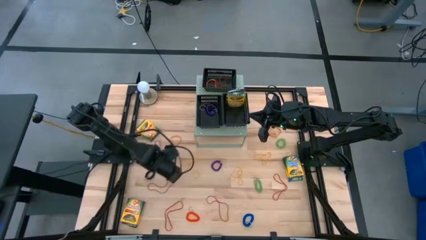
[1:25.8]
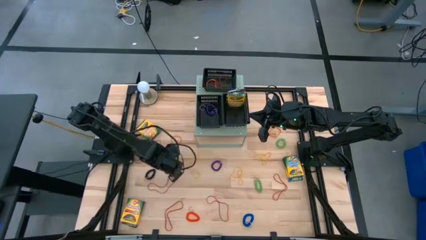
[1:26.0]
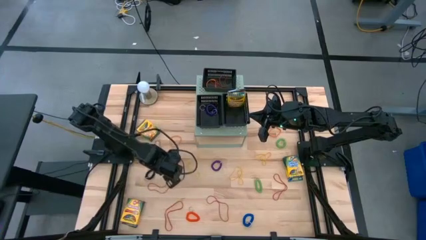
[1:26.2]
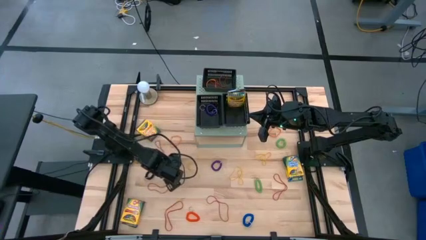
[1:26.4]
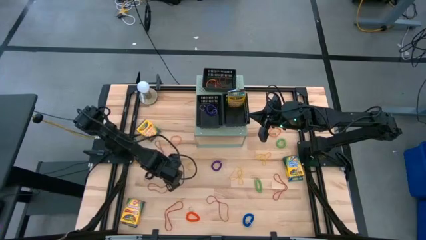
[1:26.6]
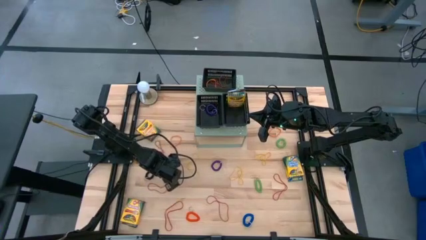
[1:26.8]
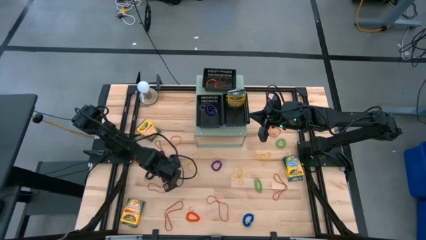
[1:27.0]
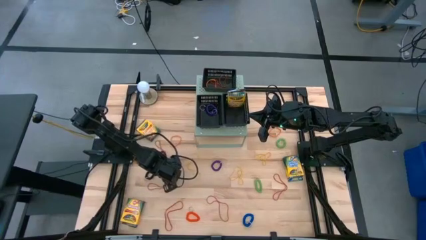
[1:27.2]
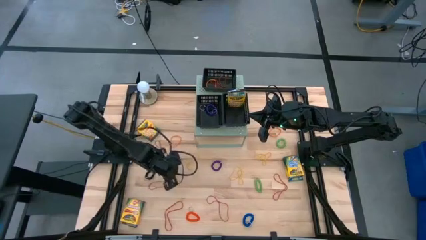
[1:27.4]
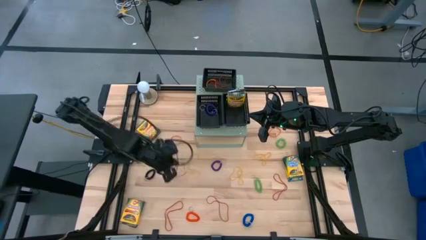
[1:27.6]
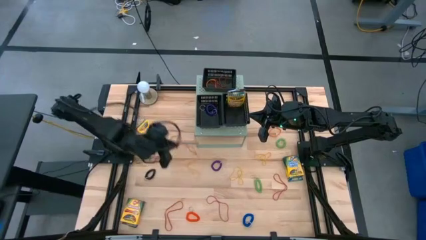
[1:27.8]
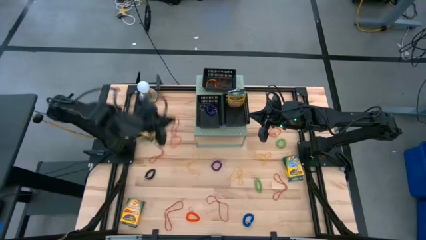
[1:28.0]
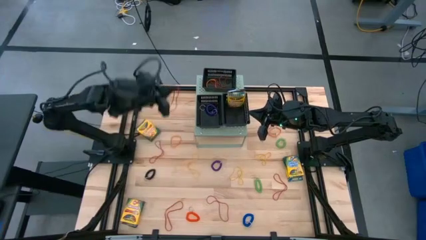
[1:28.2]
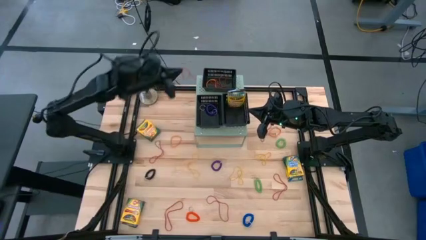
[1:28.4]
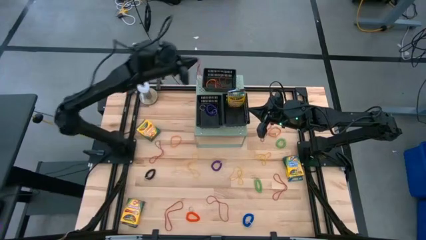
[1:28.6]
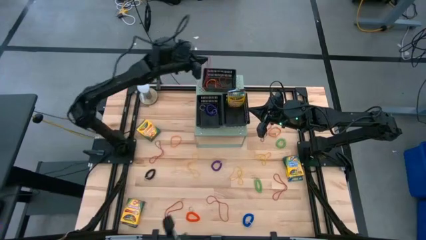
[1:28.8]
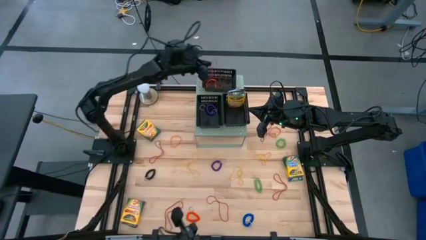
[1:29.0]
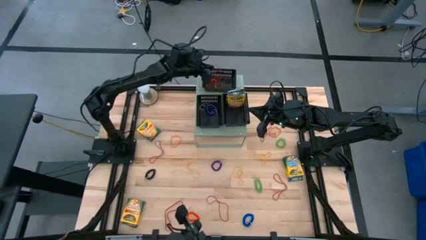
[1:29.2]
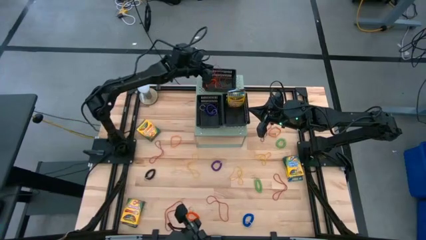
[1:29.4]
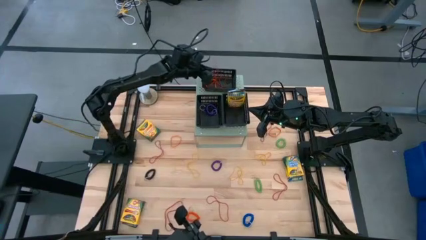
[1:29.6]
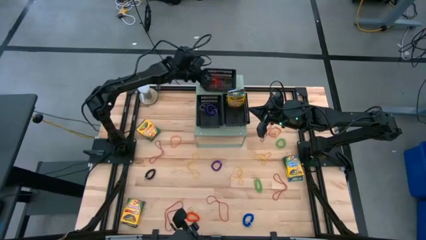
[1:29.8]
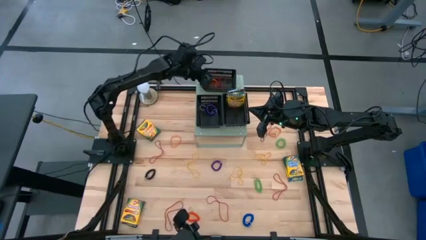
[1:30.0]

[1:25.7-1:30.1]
Task: Pick & Place Office Desk Supplies
Put the red rubber band into the top black bin

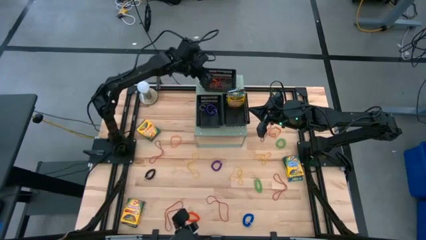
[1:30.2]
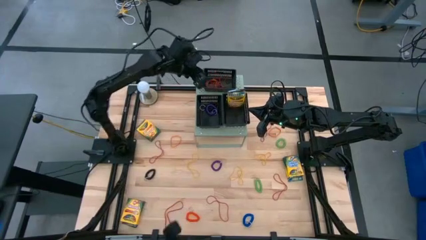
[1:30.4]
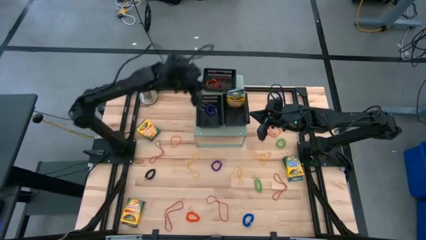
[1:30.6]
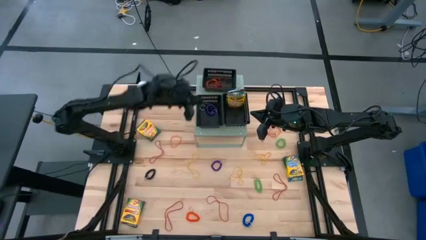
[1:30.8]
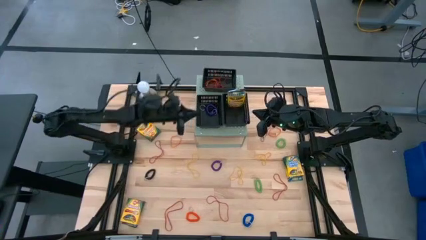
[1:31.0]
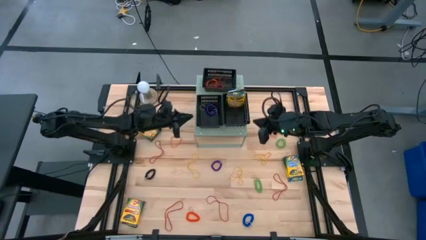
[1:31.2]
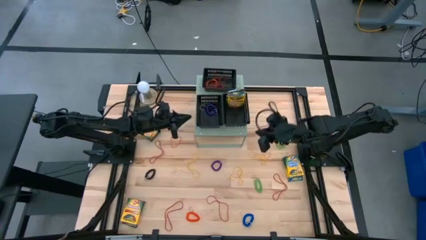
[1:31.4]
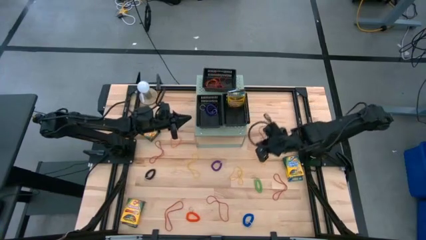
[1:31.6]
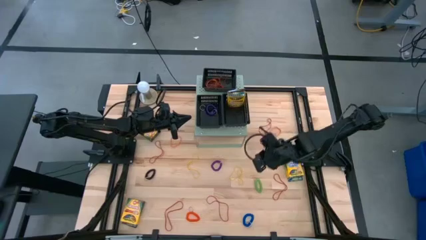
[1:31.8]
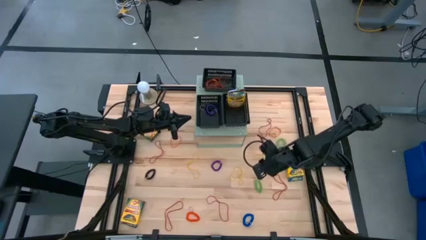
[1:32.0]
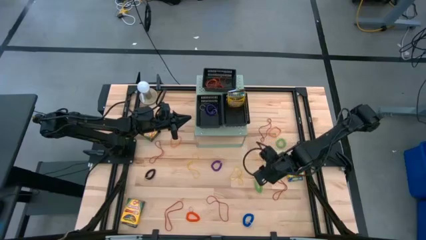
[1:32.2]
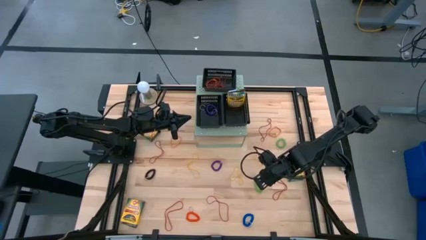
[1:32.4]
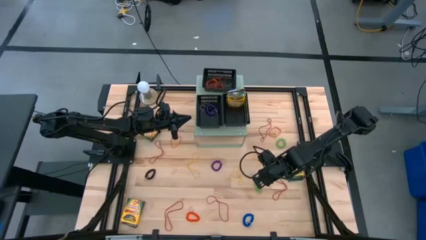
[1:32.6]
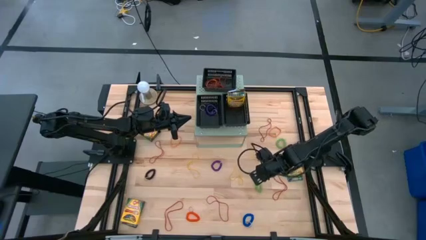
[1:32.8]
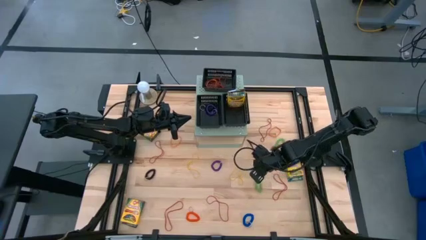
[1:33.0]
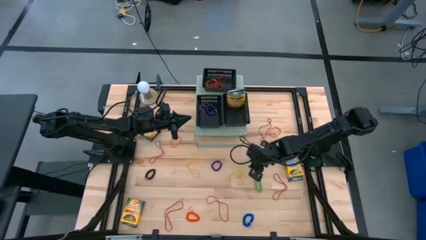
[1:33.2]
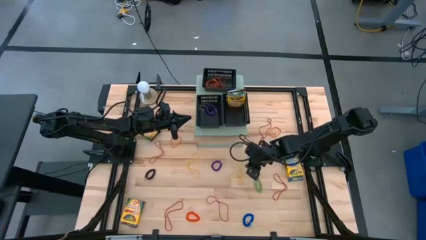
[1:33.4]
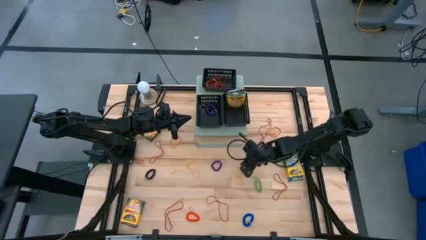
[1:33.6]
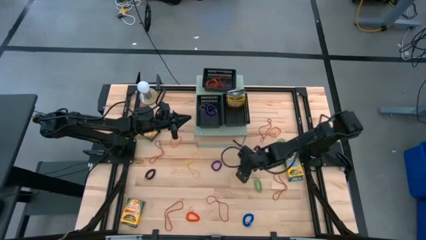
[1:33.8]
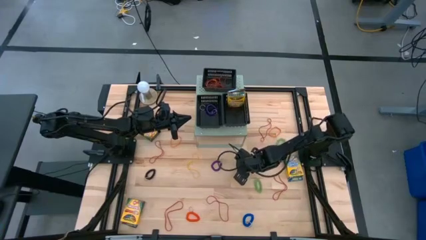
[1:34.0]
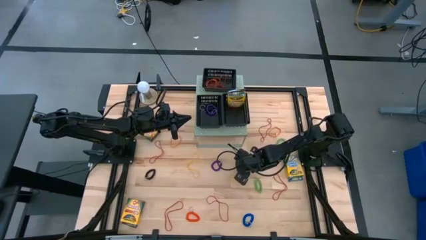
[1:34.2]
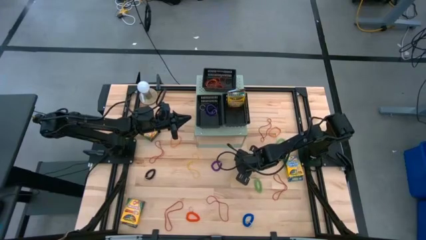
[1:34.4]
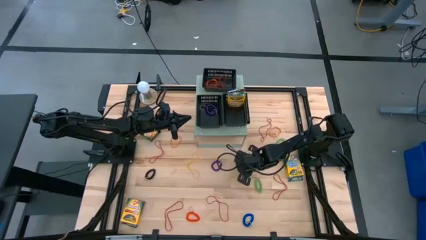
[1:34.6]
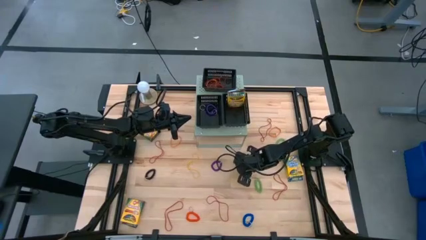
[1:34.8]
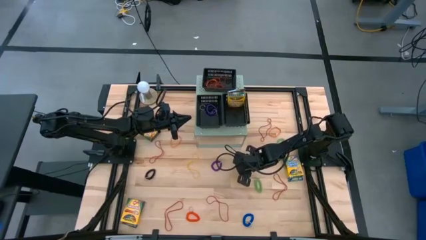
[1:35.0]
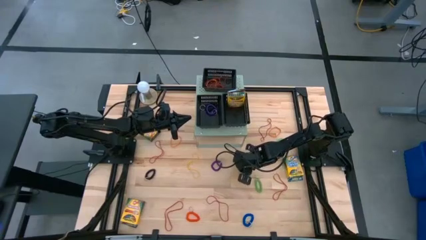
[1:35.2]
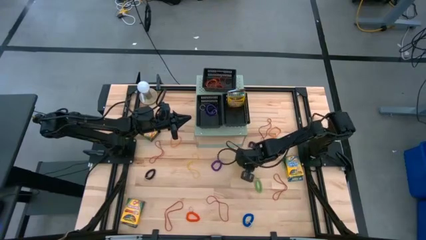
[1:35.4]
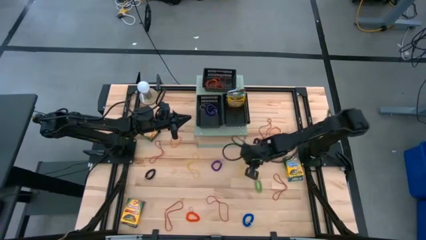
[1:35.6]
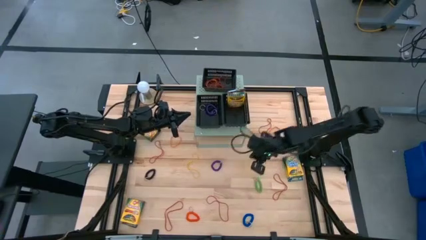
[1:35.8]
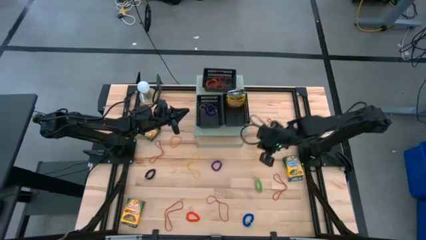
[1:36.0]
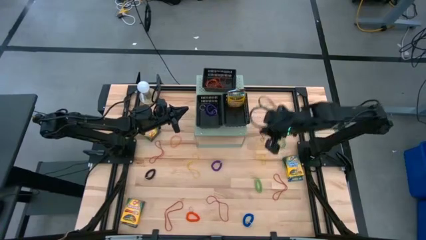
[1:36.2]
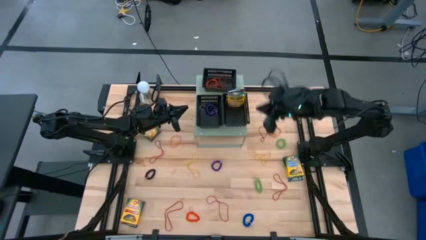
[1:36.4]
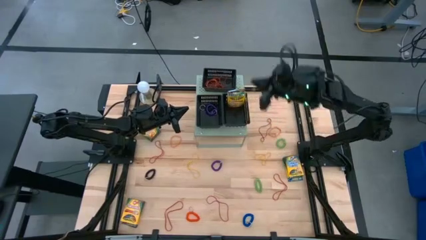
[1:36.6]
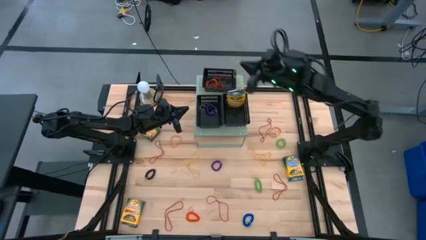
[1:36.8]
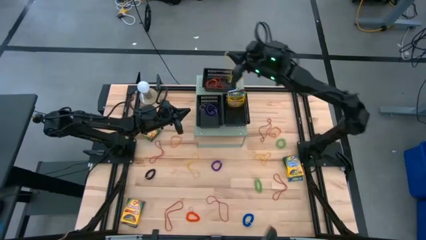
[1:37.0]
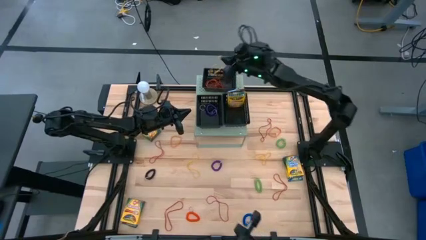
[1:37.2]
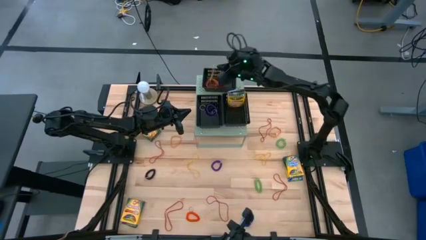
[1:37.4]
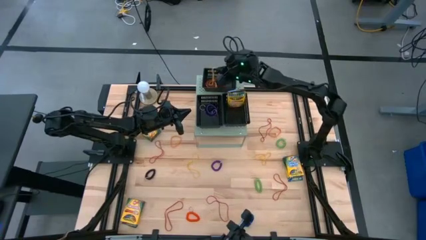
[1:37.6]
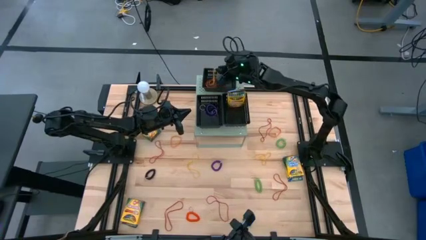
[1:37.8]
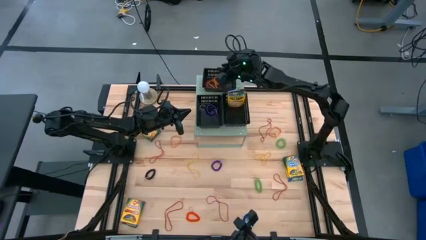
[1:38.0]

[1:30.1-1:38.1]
Put the yellow rubber band into the top black bin

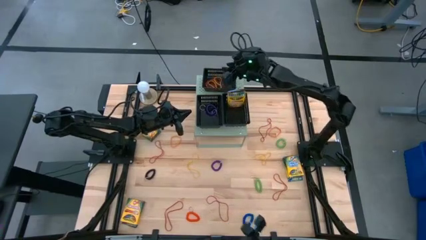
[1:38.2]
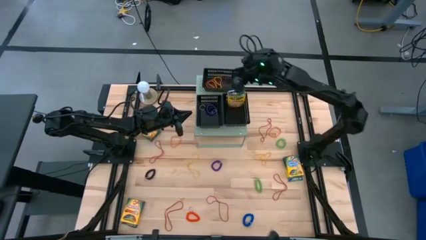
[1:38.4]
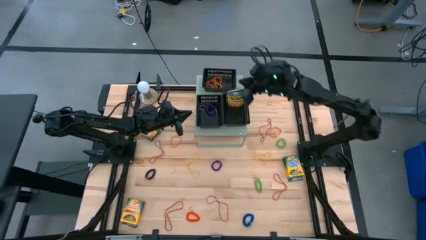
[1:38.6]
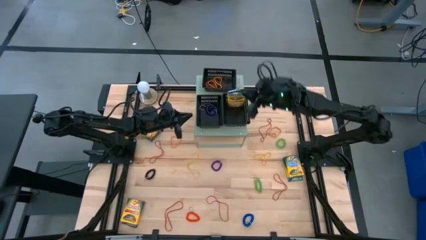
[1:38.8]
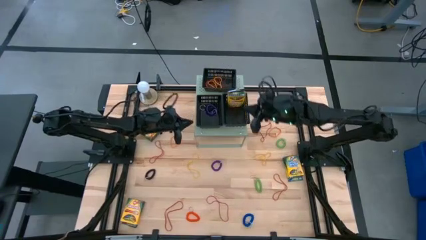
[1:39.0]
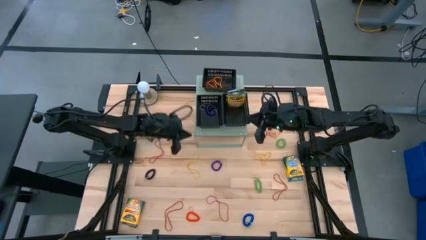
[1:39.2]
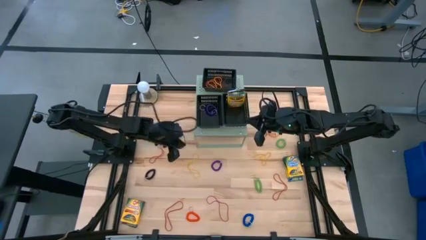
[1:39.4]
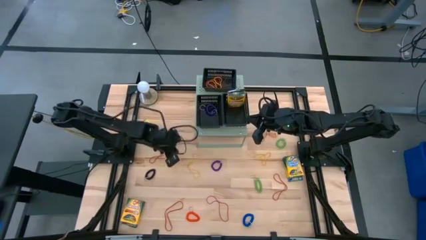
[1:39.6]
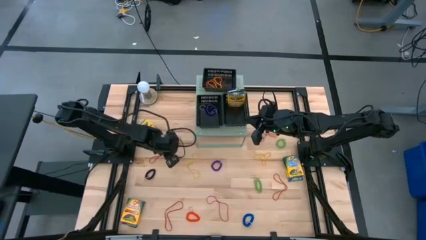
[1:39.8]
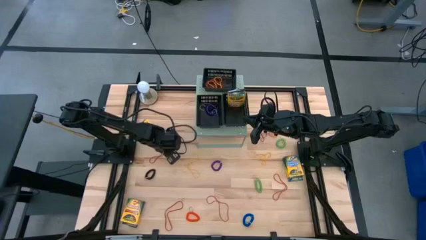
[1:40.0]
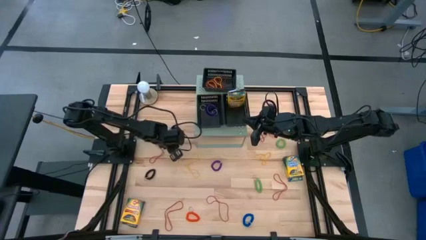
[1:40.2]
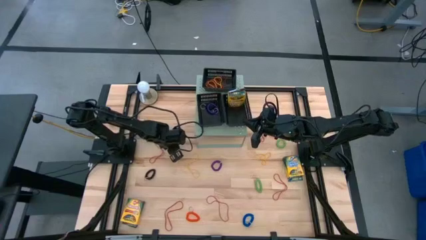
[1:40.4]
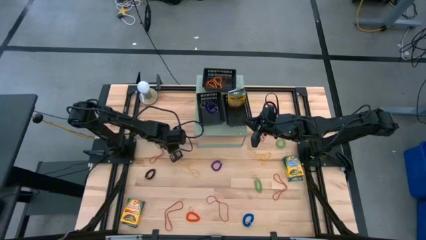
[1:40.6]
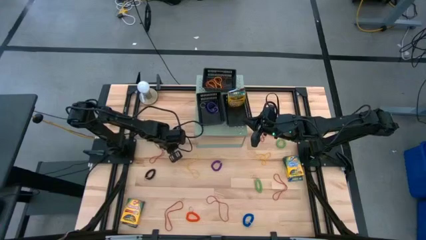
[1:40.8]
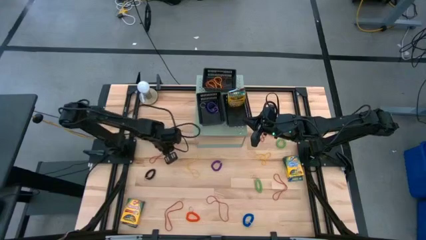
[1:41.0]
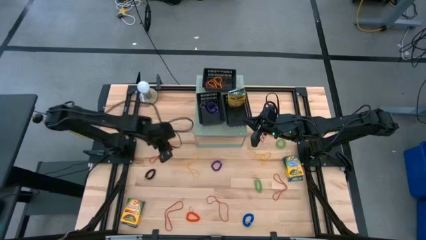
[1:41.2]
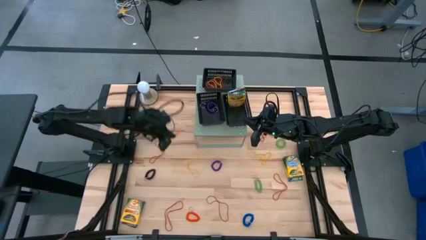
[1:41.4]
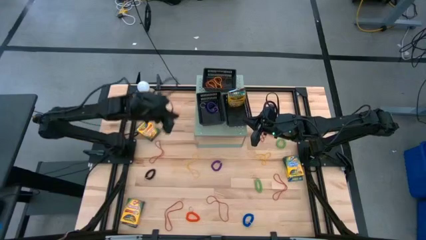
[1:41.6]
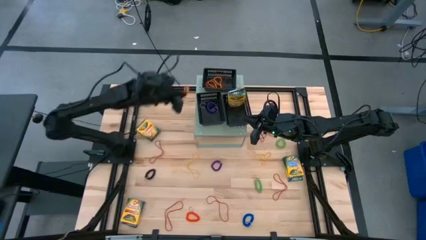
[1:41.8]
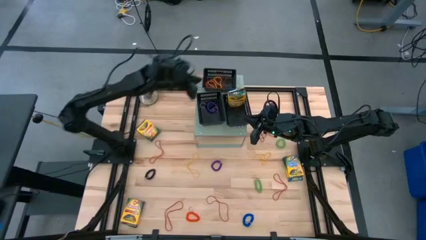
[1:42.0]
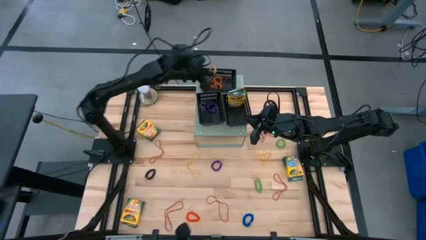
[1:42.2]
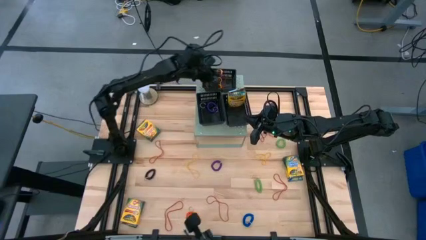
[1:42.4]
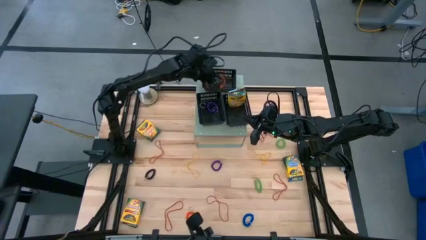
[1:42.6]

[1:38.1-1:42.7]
Put the orange rubber band into the top black bin

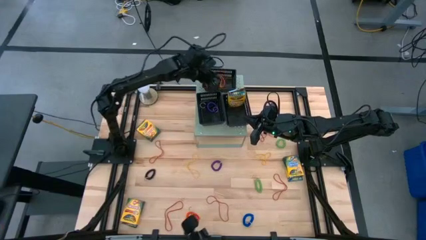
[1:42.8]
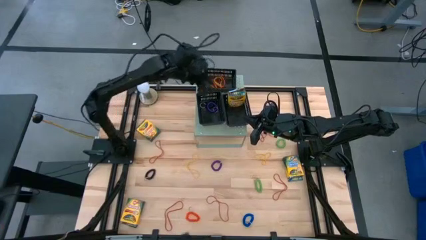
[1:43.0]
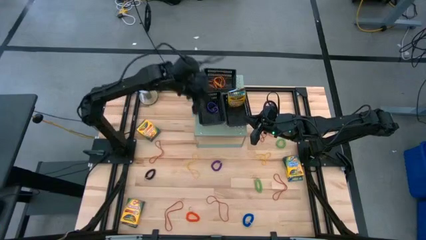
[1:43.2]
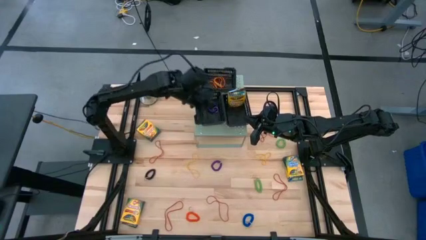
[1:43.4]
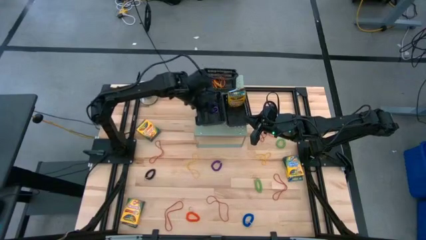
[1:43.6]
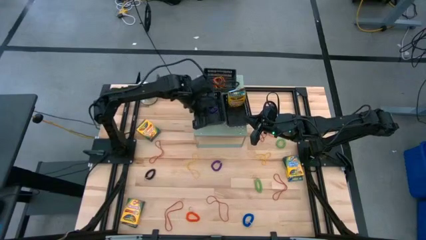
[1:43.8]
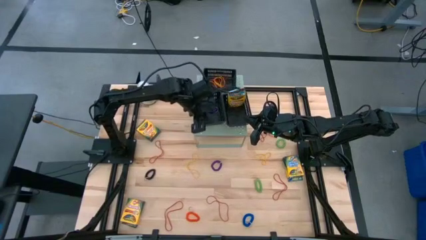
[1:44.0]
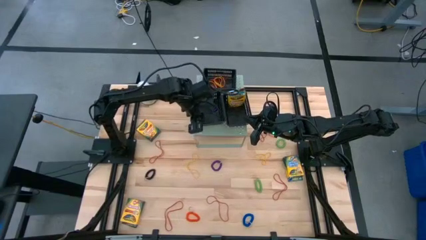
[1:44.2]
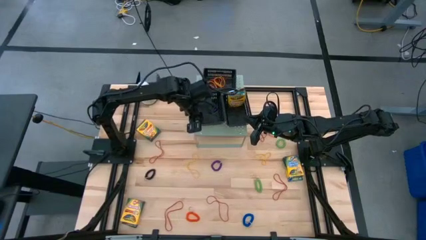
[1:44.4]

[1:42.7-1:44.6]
Adjust the bottom left black bin
